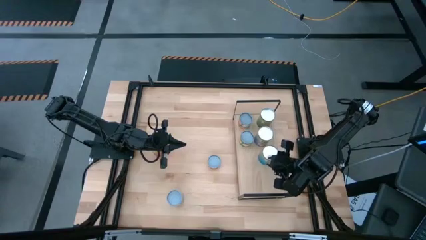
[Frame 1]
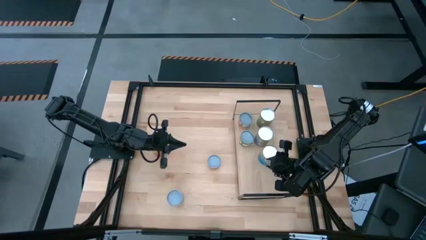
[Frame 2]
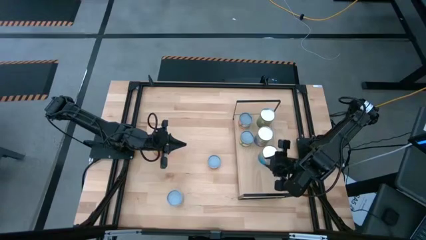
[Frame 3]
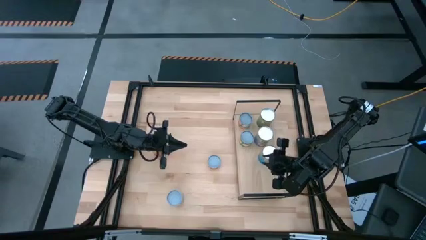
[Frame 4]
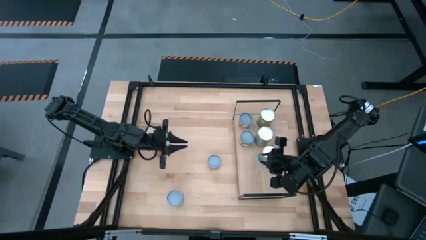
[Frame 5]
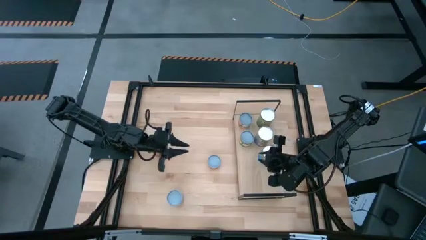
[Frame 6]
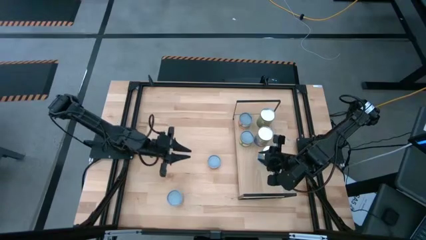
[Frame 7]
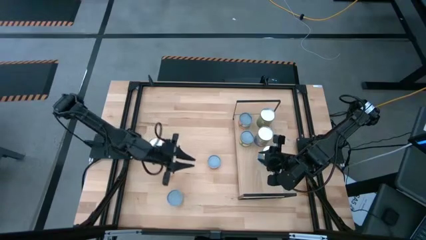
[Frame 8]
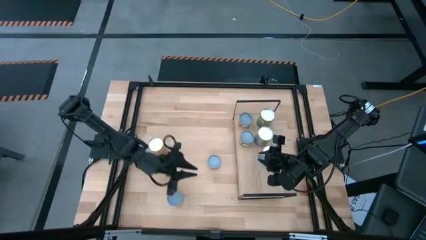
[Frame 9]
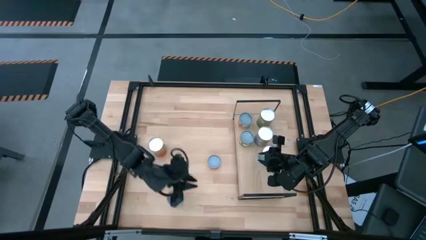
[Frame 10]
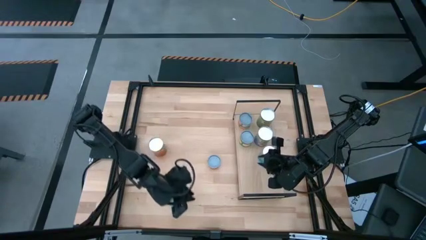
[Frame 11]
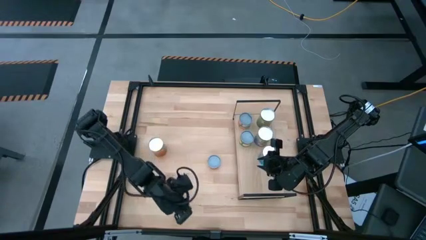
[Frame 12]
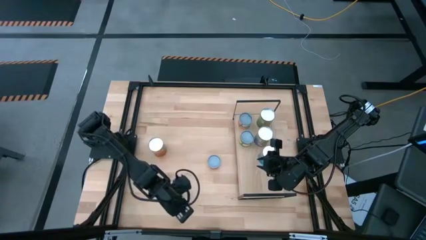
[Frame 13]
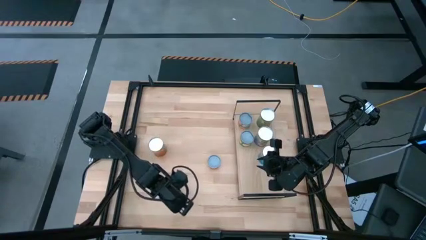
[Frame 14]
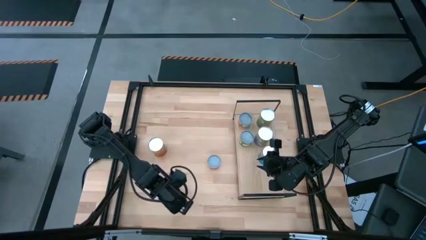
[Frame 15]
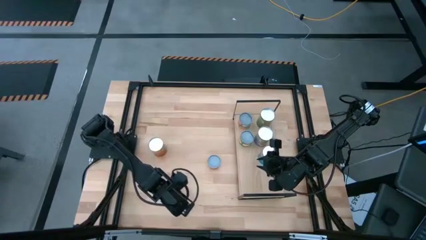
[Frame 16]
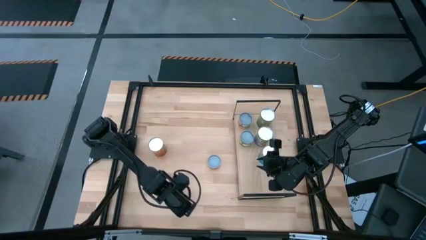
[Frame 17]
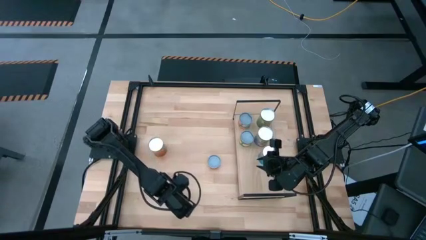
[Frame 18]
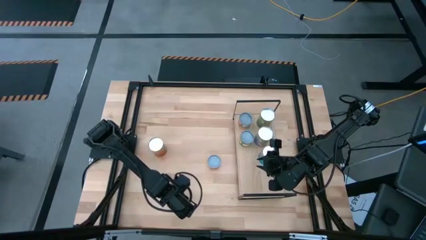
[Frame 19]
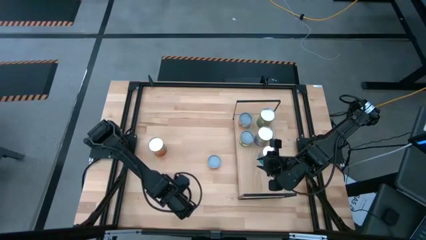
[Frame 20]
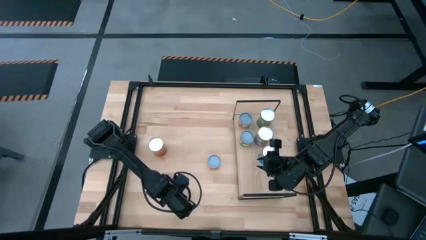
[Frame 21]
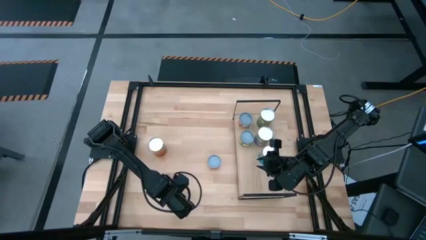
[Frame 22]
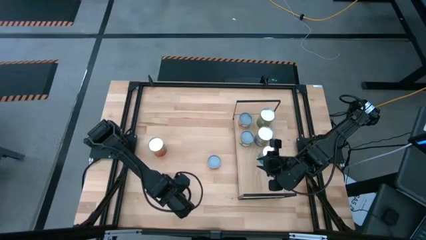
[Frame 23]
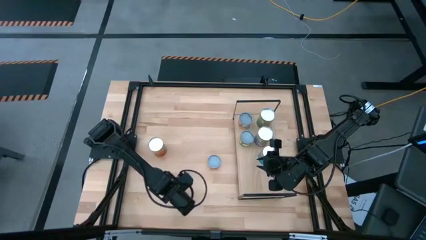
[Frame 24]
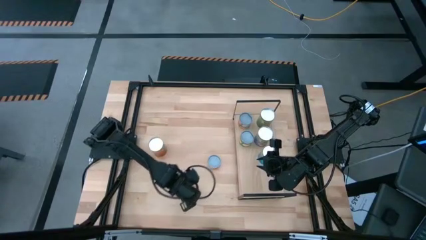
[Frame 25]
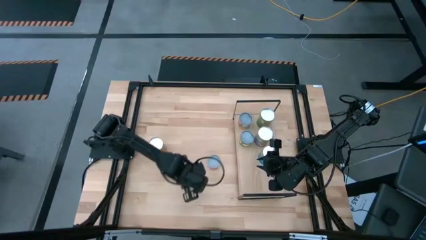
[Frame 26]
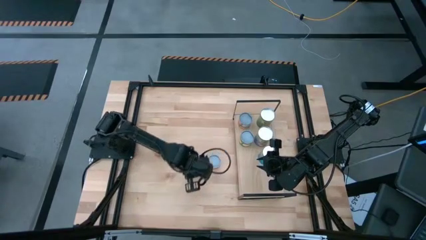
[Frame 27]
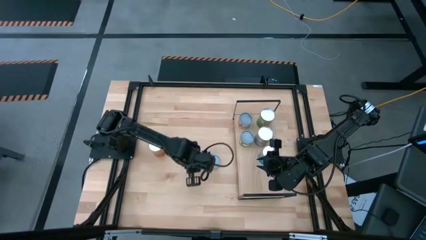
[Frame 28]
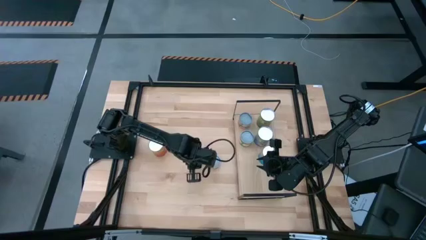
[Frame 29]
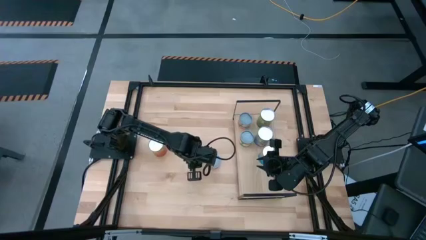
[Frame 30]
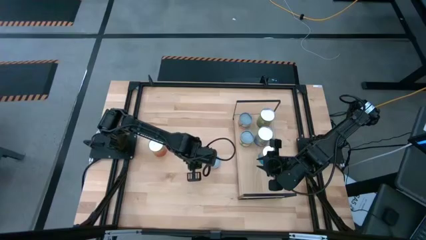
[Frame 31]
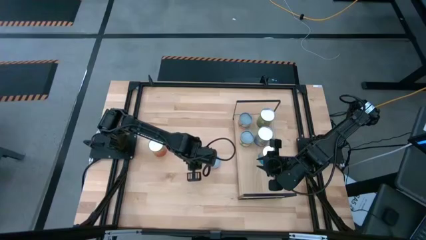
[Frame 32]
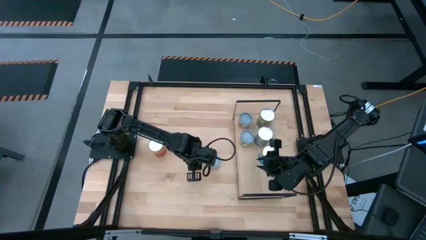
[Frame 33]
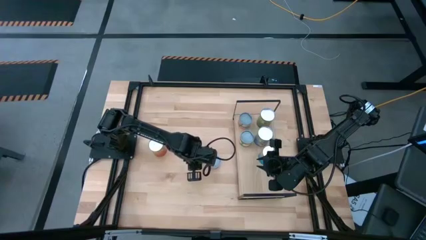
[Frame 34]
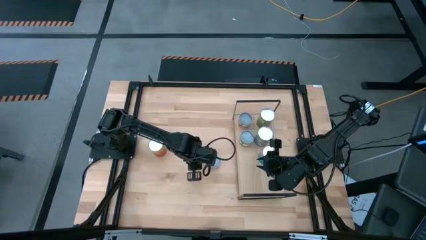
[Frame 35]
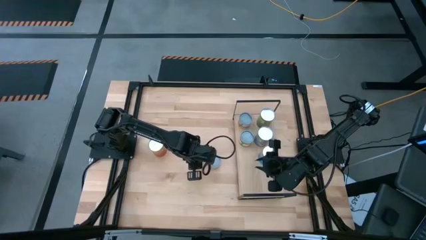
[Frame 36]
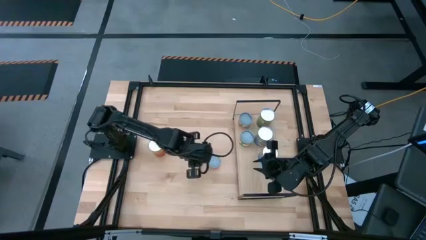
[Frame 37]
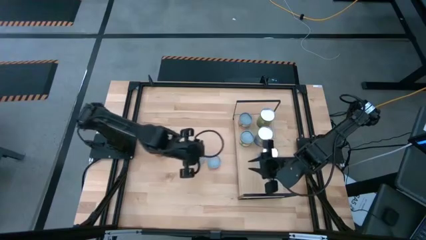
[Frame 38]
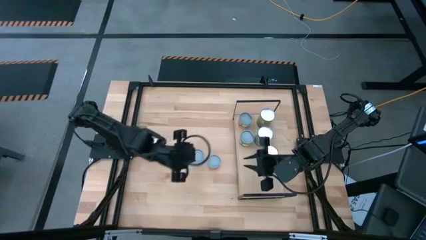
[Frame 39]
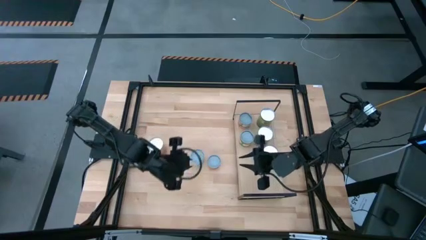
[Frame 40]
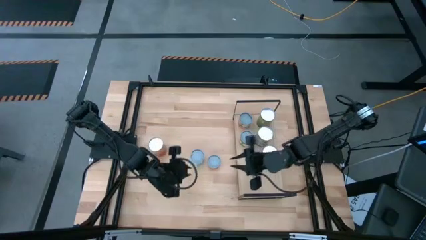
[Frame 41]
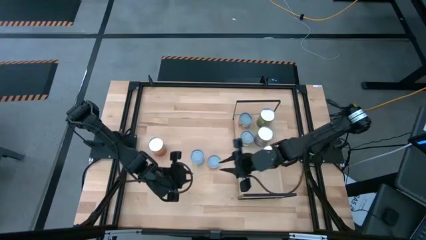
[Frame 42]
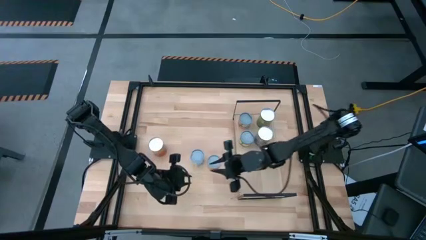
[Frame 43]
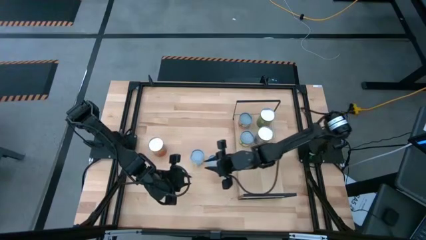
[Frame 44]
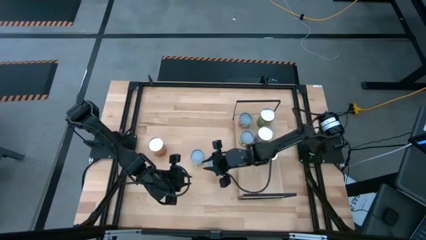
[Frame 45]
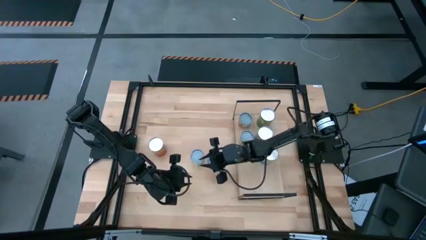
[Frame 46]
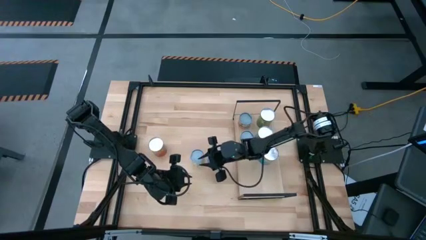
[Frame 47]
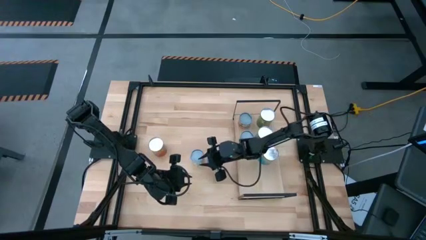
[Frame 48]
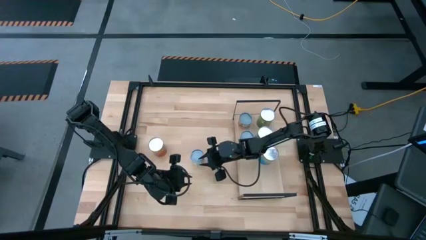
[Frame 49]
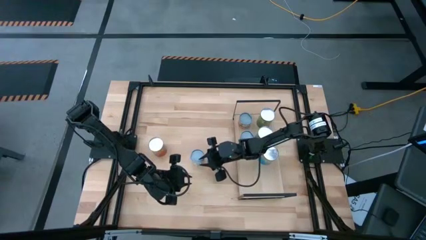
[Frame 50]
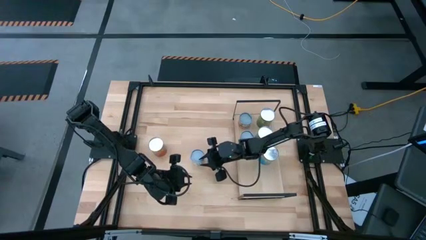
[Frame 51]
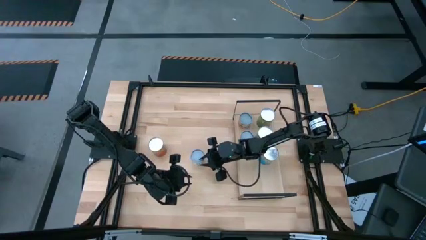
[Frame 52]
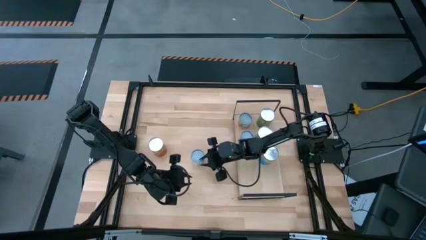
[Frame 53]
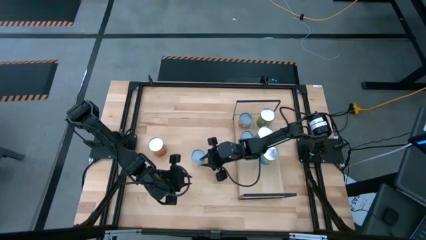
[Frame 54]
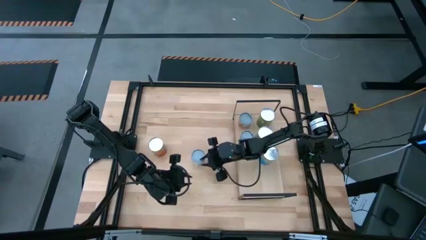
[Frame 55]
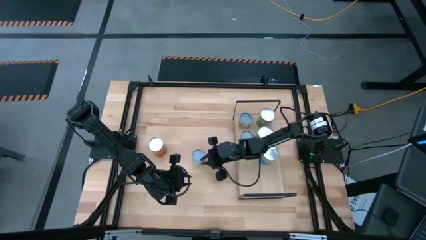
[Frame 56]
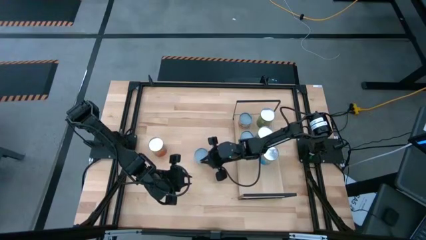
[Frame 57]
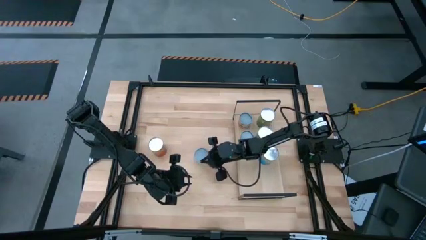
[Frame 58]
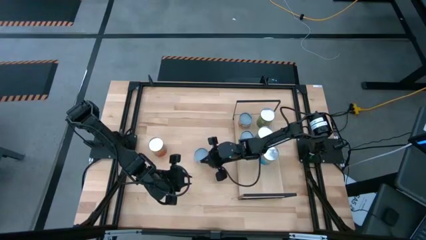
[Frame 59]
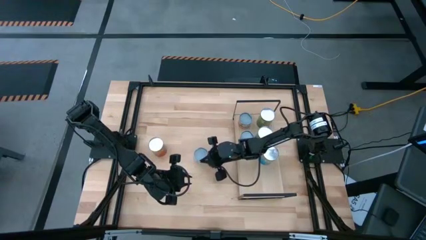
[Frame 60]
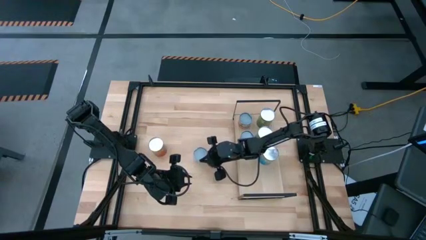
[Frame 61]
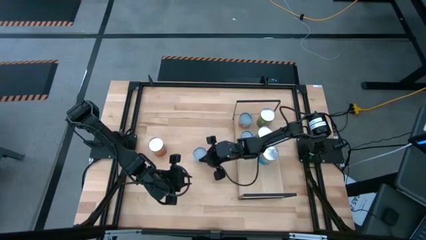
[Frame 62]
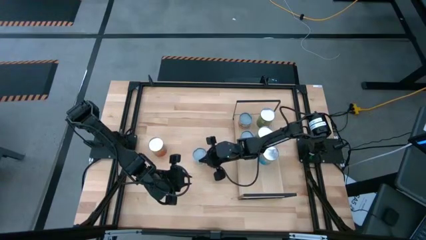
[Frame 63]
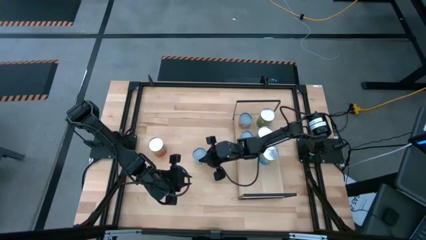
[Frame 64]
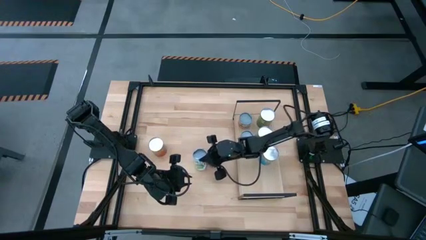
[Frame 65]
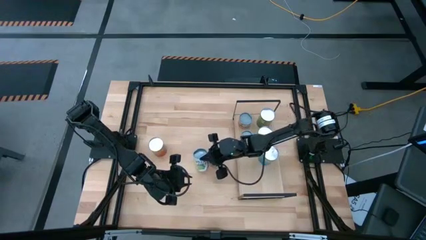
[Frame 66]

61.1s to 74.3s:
Task: Pick and place cans onto a shelf
Put the canned mixed fruits on the shelf
